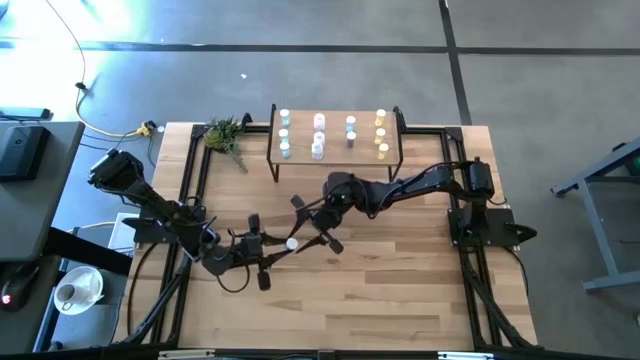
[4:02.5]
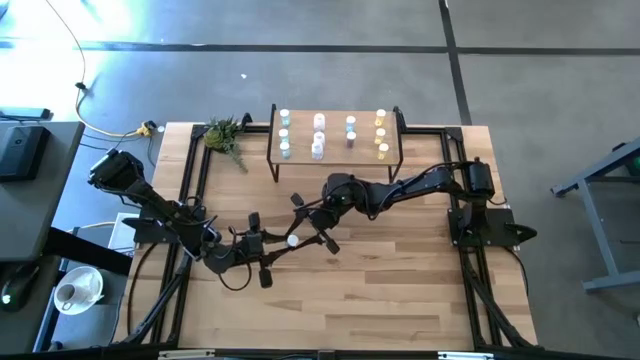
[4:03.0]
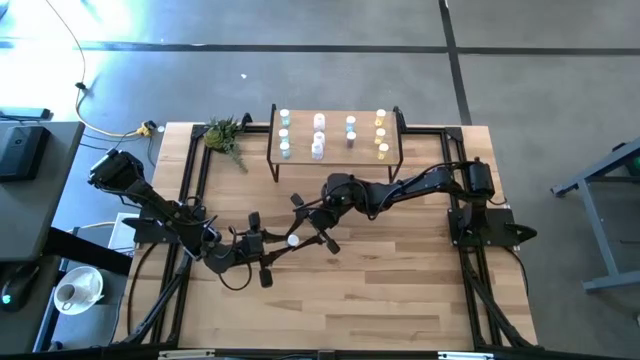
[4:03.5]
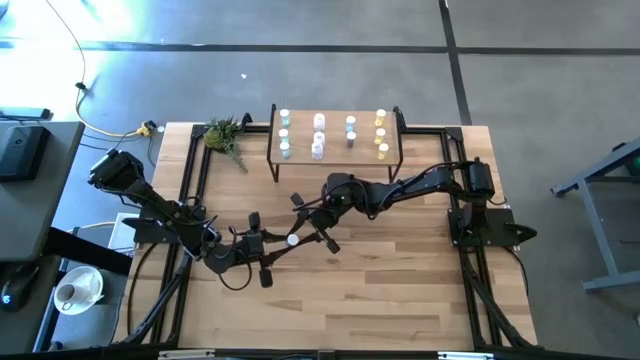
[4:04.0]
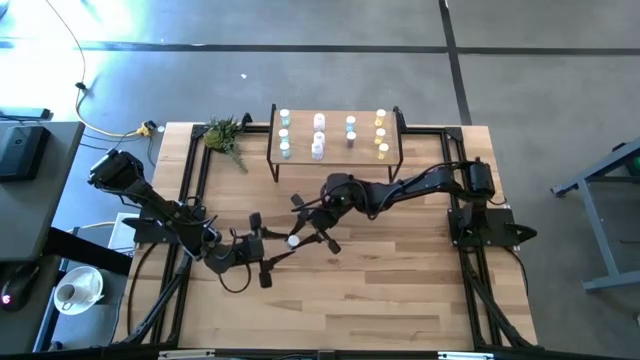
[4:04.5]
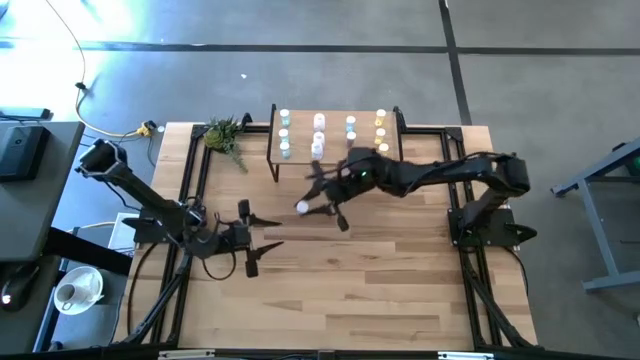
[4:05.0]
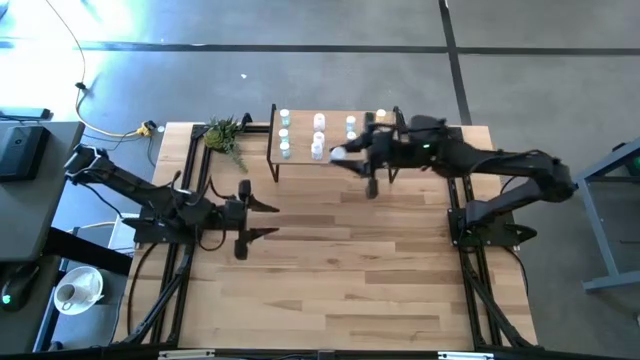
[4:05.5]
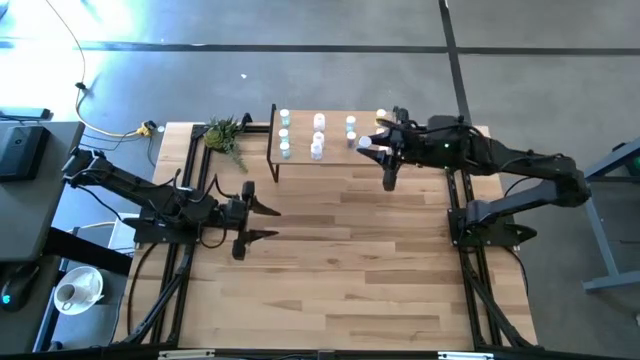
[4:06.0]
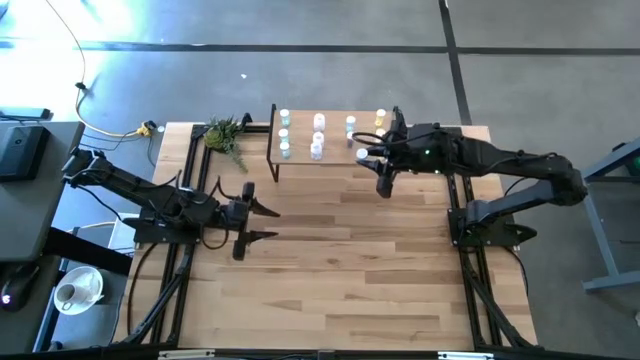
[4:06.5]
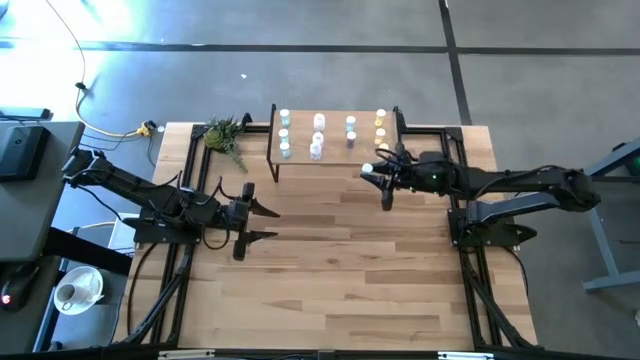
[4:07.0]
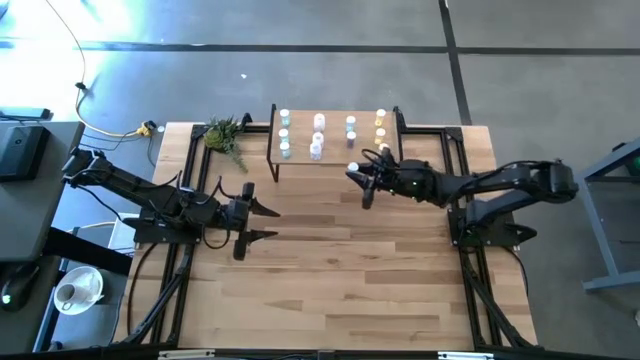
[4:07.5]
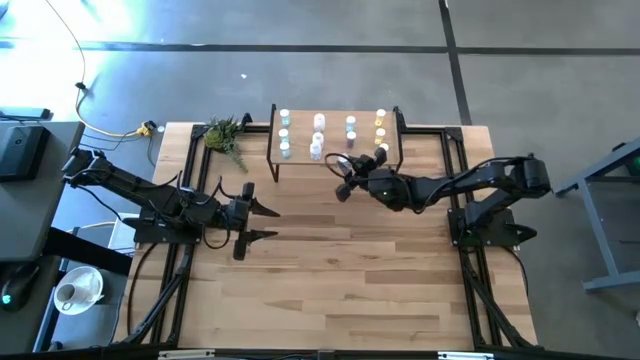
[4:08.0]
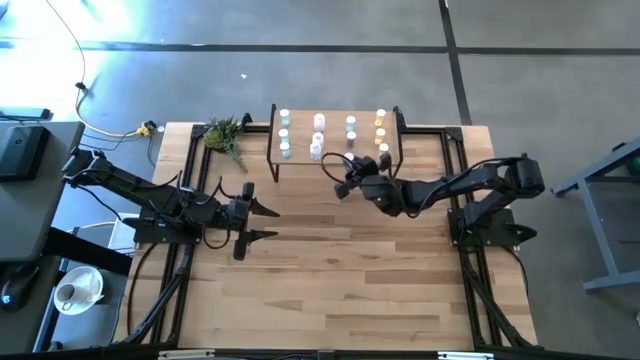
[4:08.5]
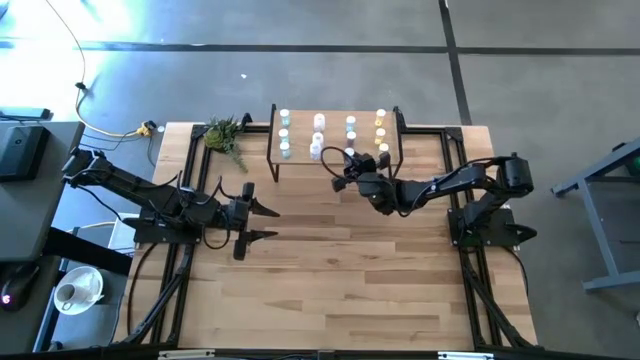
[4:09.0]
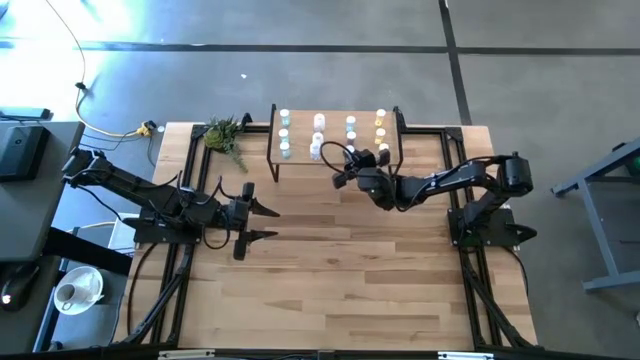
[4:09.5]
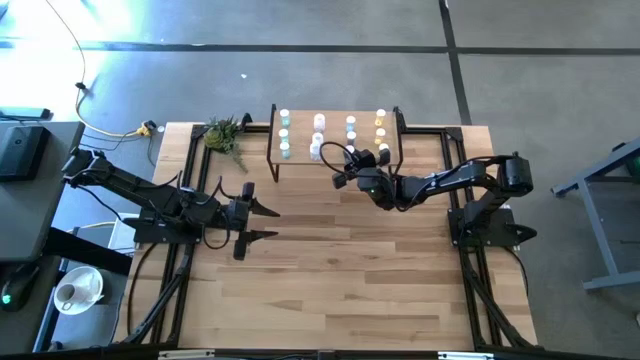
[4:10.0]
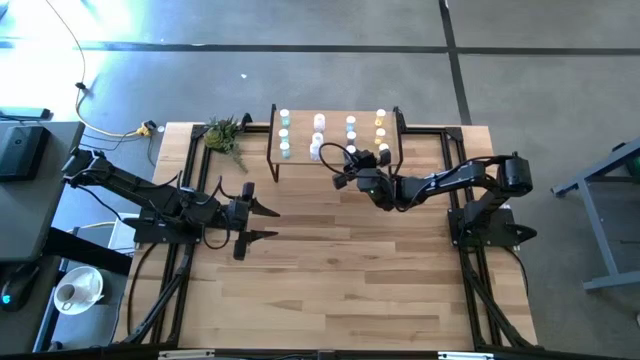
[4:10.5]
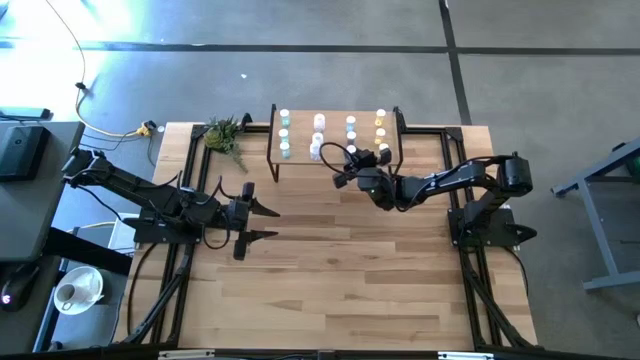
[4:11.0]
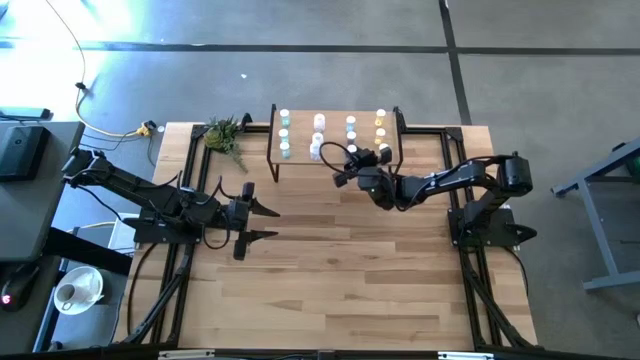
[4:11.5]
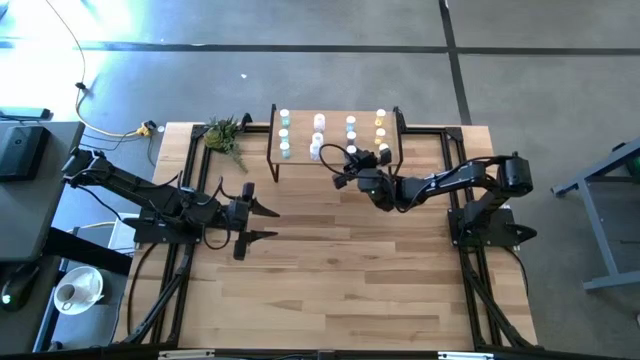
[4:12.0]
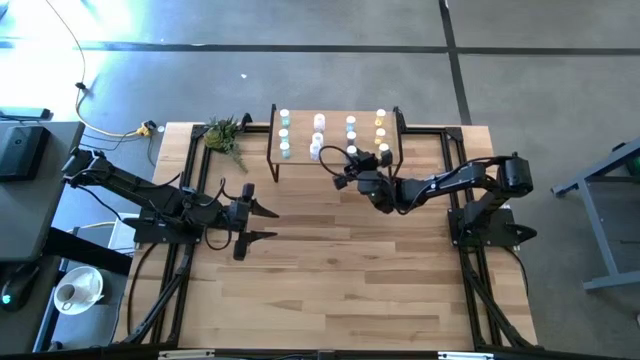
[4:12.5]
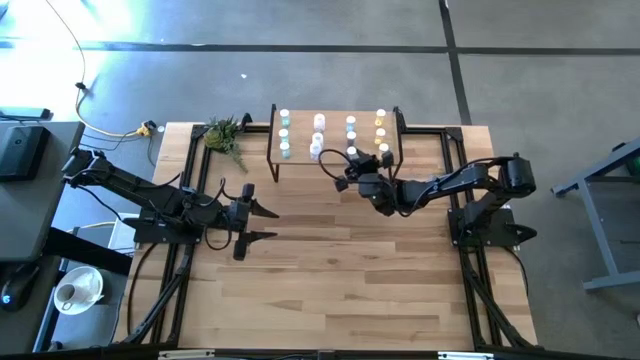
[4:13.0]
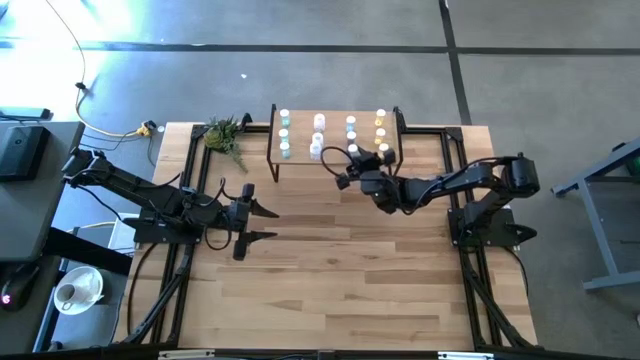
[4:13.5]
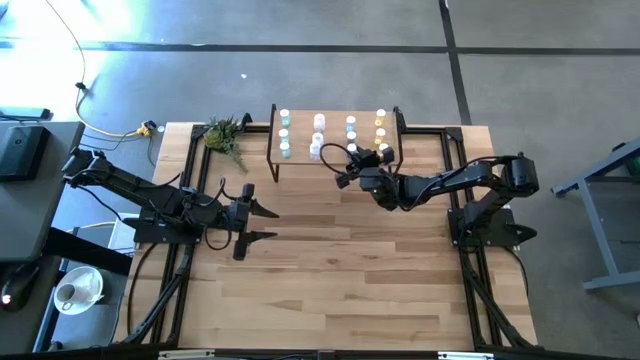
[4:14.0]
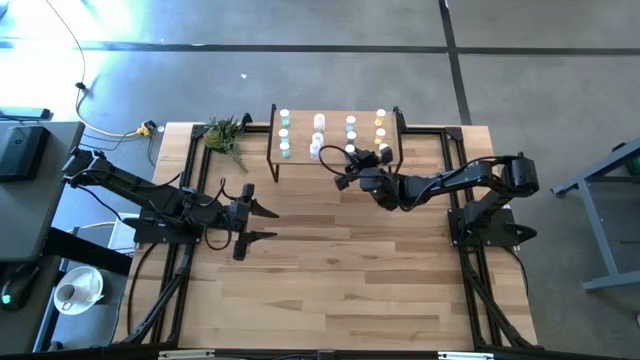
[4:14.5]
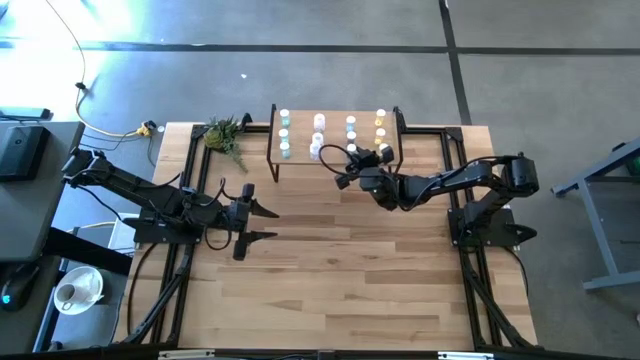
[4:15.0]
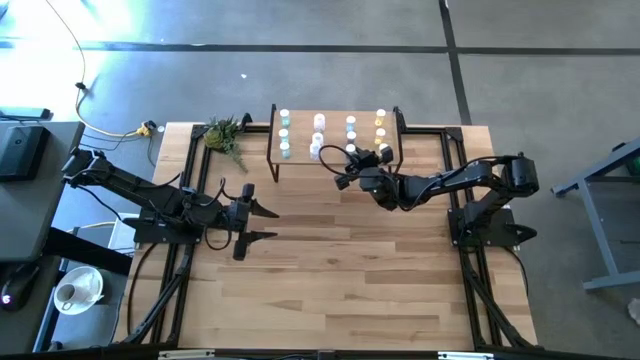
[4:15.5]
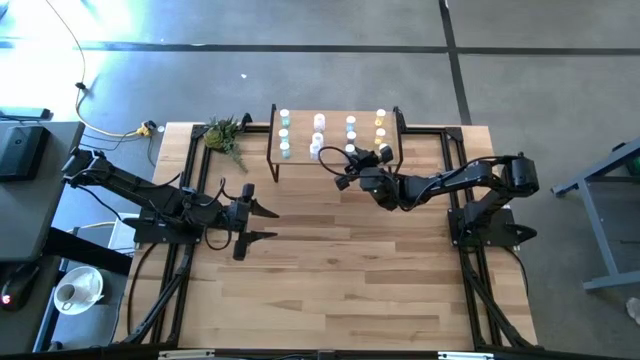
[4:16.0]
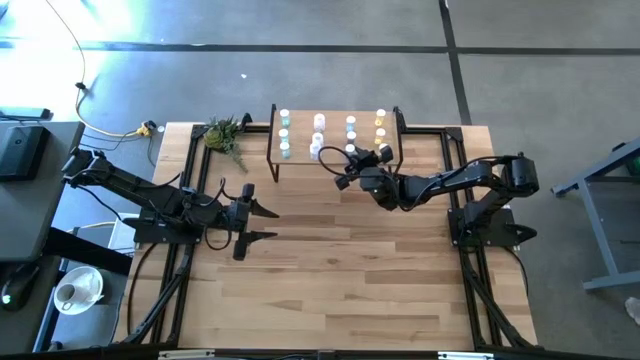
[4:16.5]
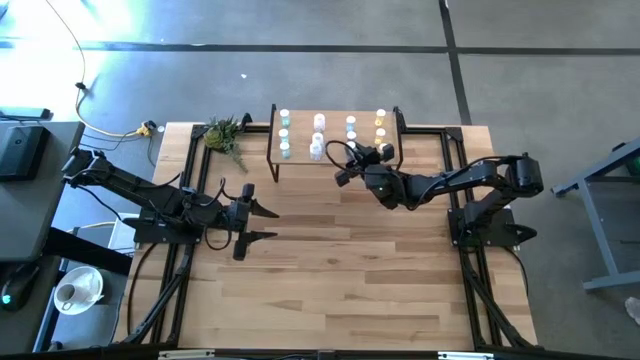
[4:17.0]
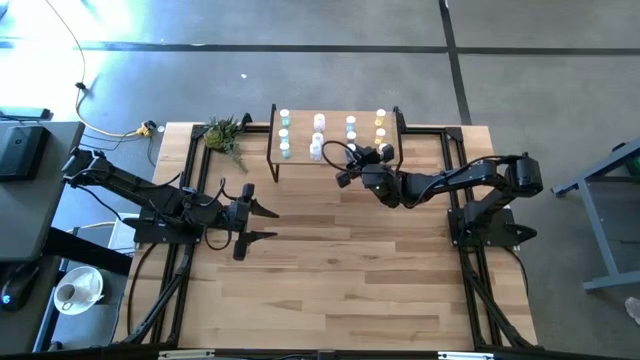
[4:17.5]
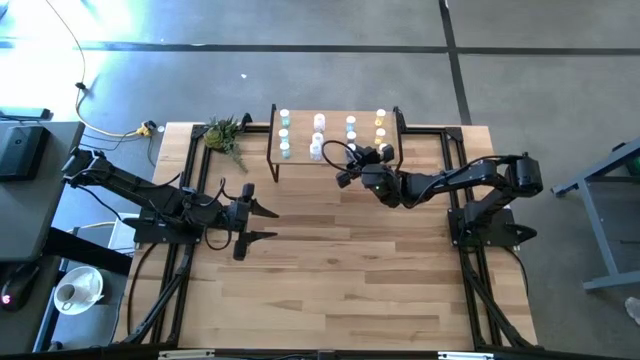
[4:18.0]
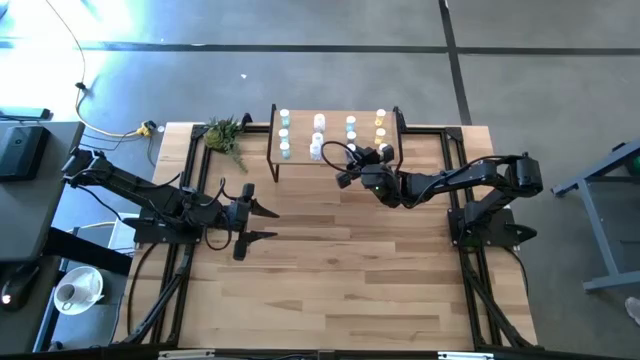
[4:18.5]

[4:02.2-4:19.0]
Task: Pick and place medicine bottles onto shelf by color
Put the blue pill bottle on the shelf aligned with the other blue pill bottle
